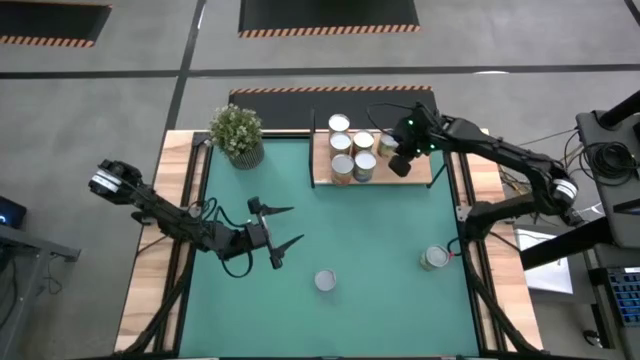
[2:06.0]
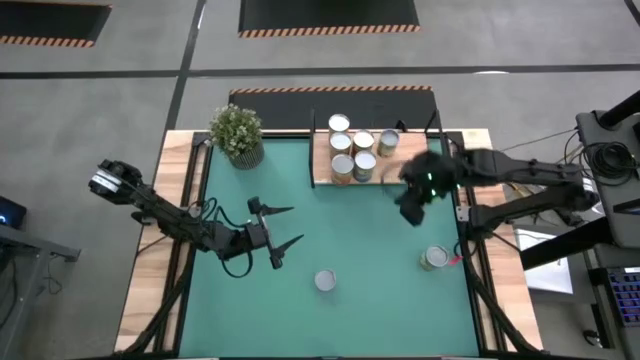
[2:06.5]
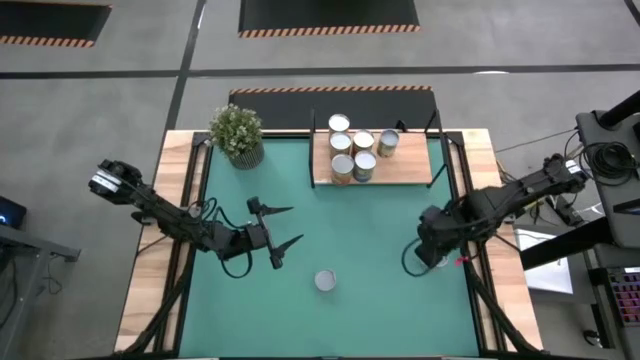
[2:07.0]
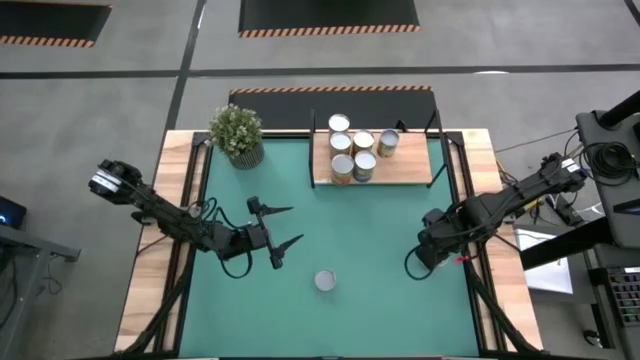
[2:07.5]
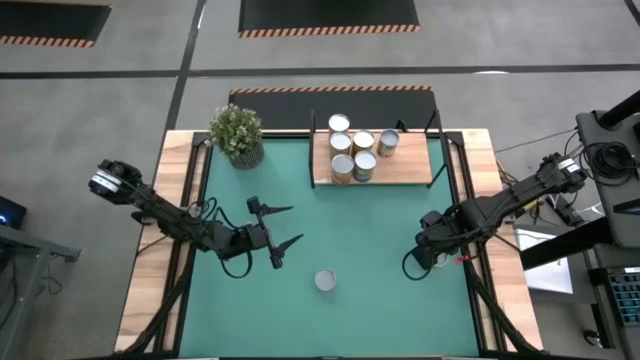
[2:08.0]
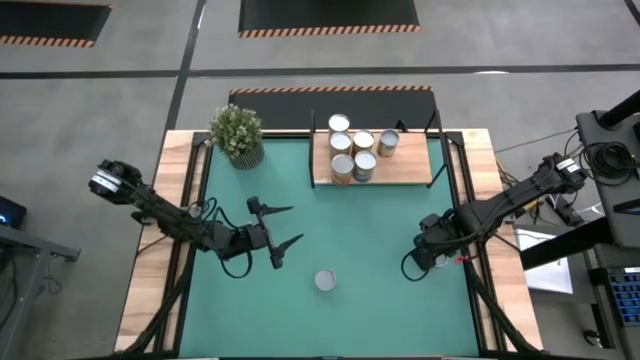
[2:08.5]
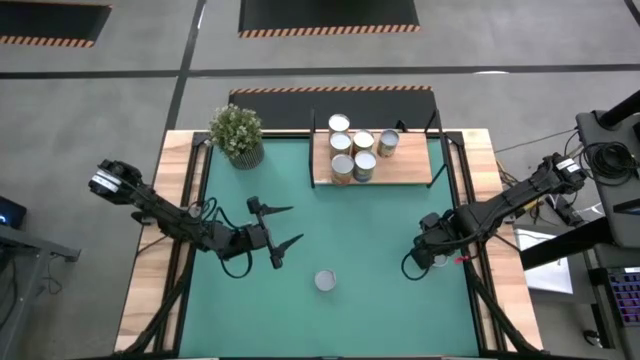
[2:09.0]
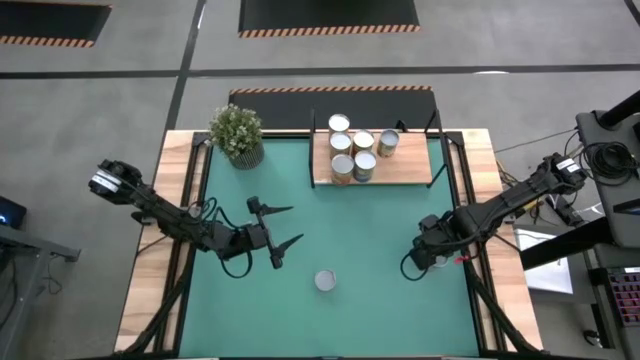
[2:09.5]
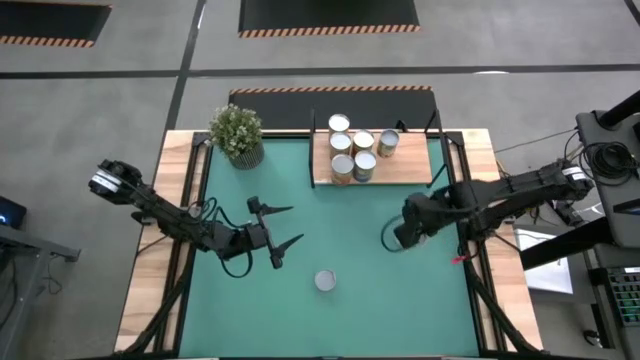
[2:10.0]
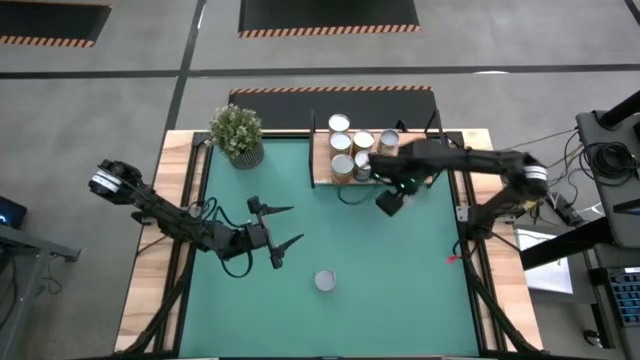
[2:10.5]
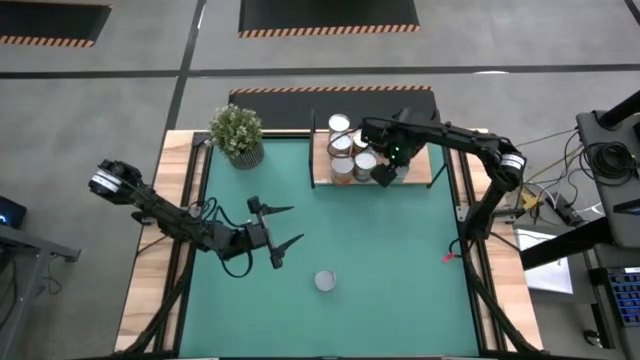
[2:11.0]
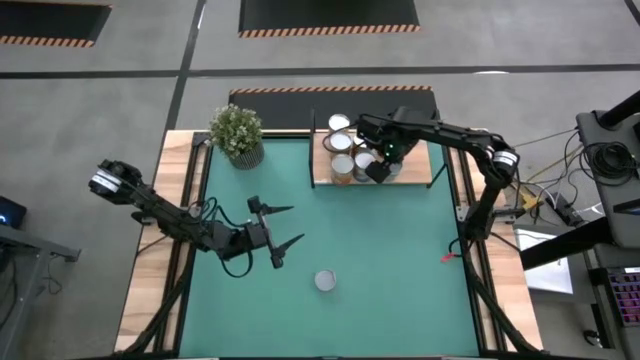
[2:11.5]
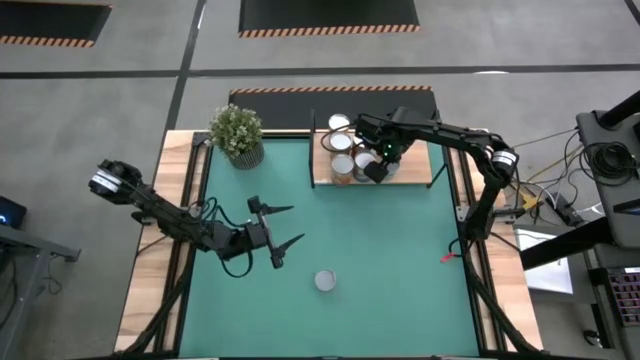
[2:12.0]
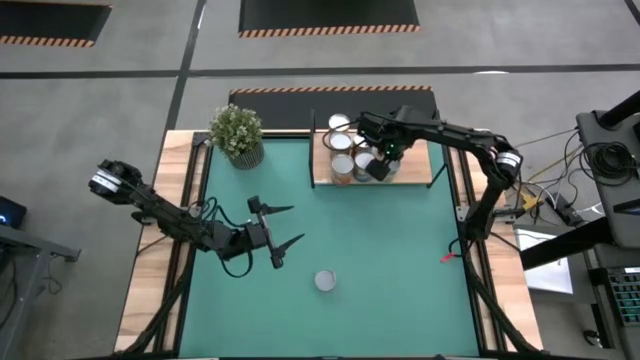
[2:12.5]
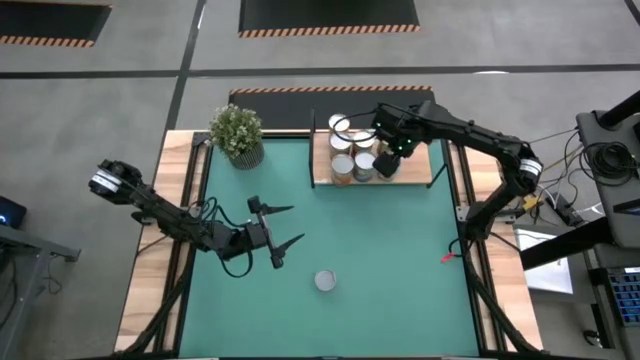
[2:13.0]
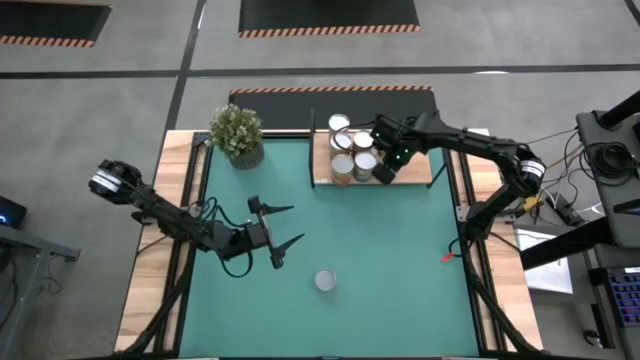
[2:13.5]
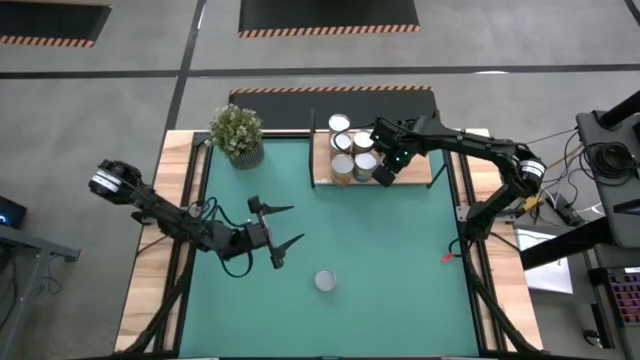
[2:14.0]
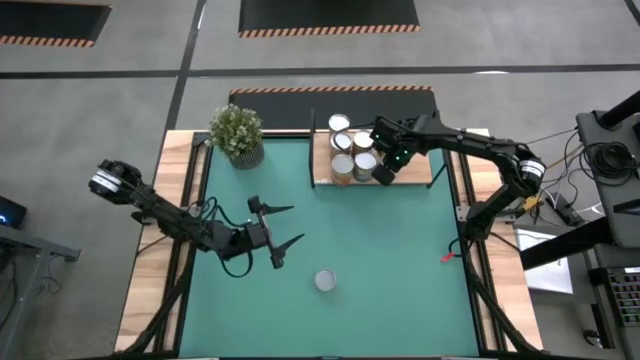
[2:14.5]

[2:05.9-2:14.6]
Task: Pick and place cans onto a shelf
Put the green can on the shelf

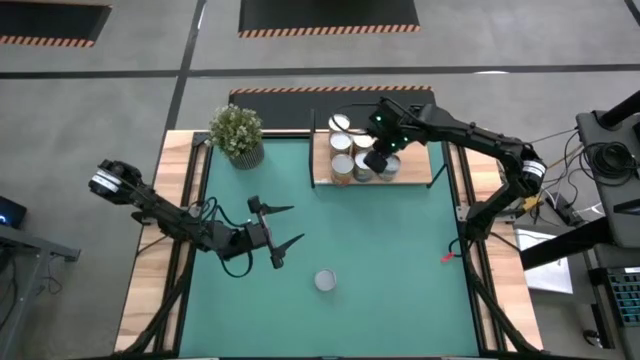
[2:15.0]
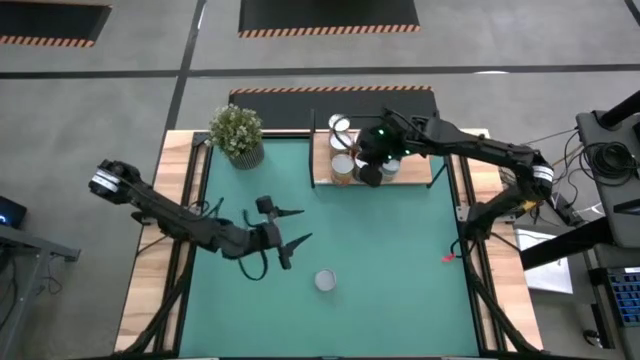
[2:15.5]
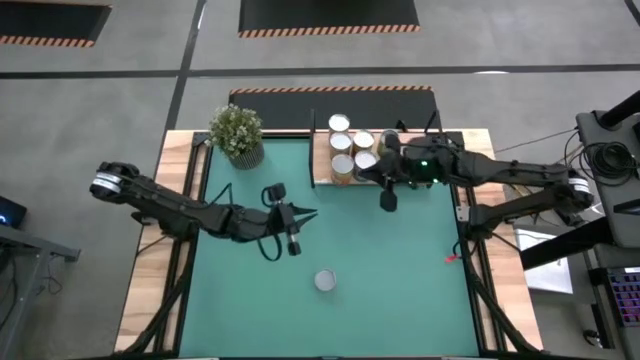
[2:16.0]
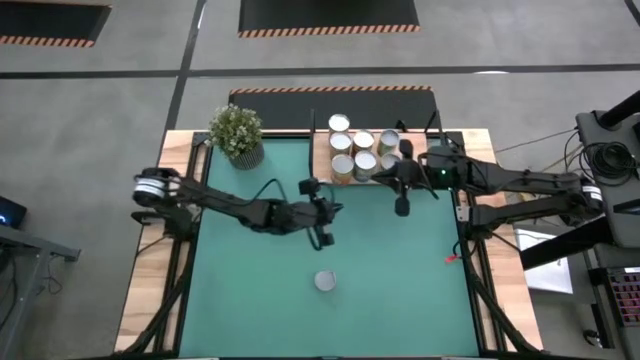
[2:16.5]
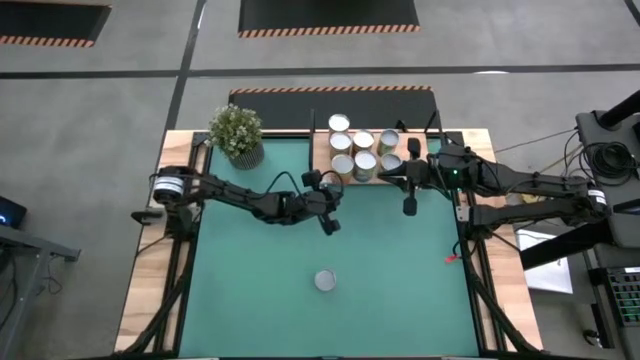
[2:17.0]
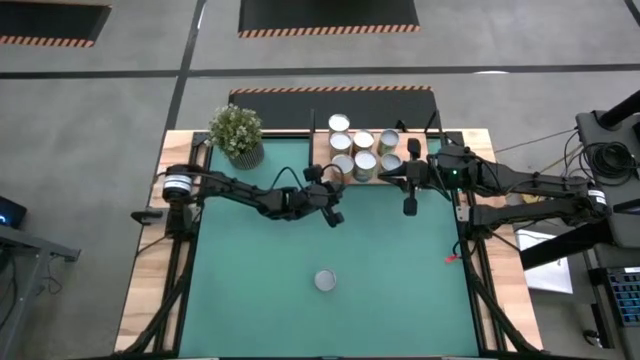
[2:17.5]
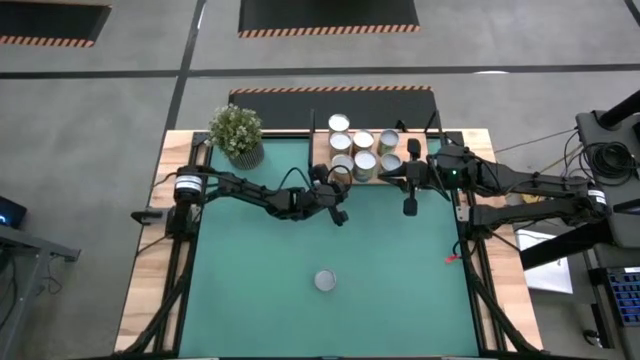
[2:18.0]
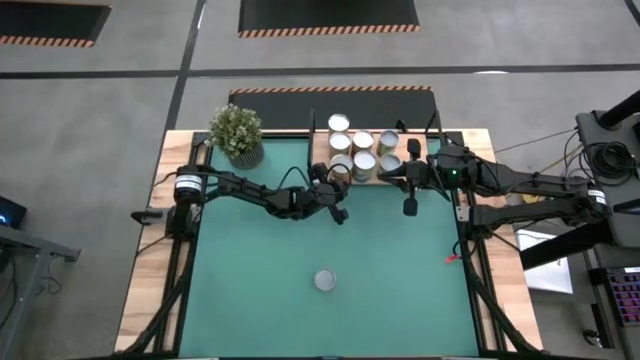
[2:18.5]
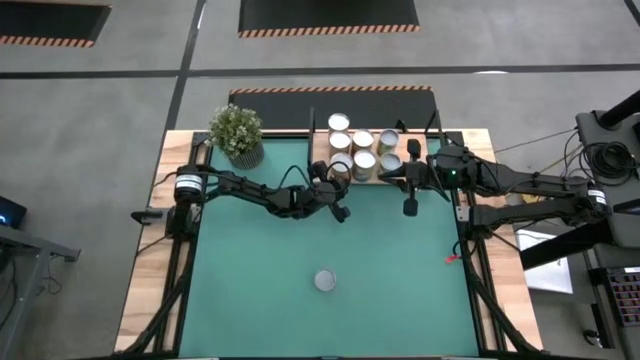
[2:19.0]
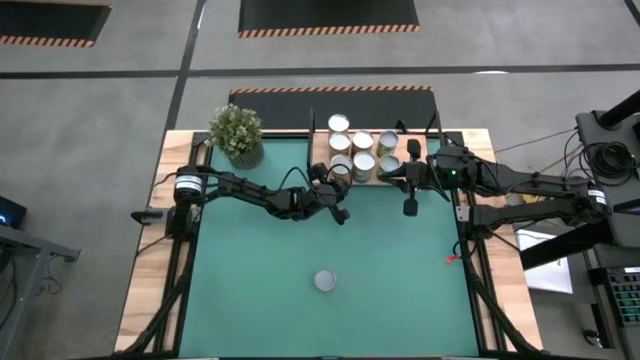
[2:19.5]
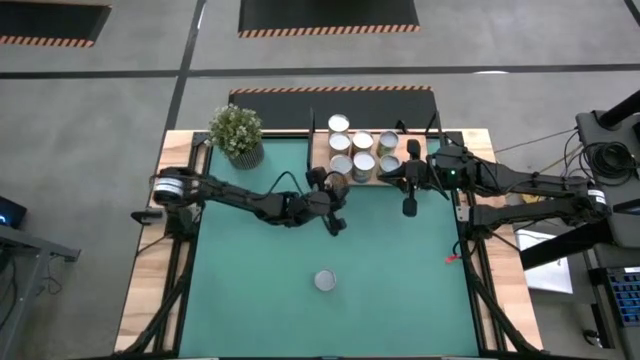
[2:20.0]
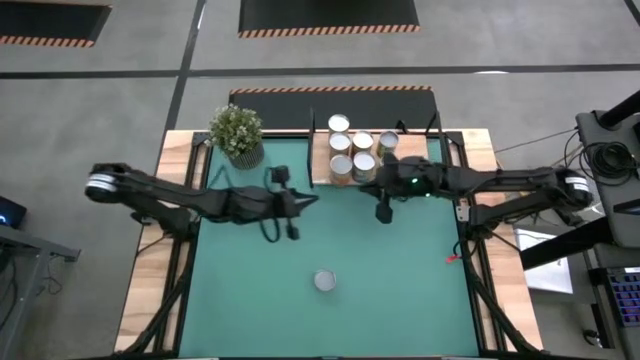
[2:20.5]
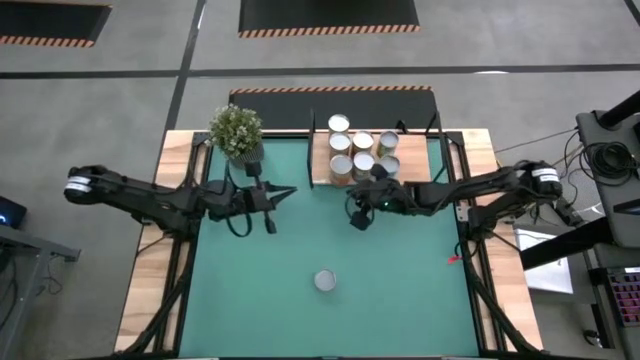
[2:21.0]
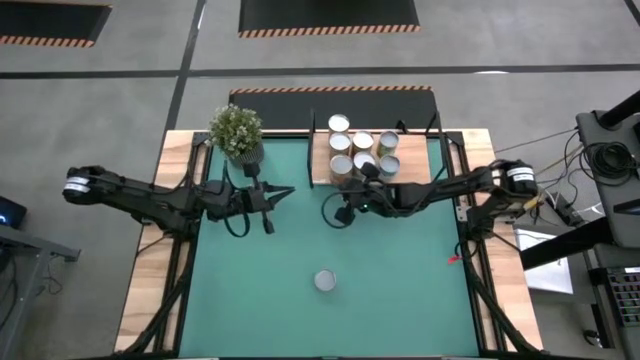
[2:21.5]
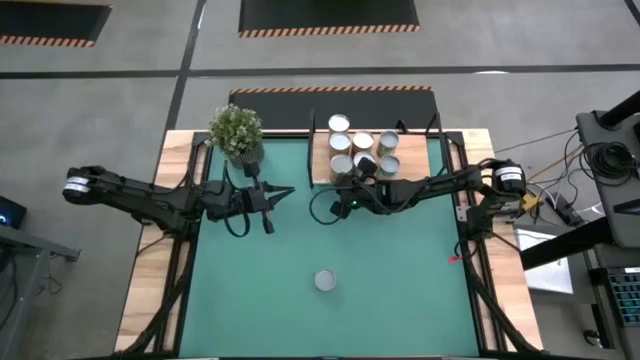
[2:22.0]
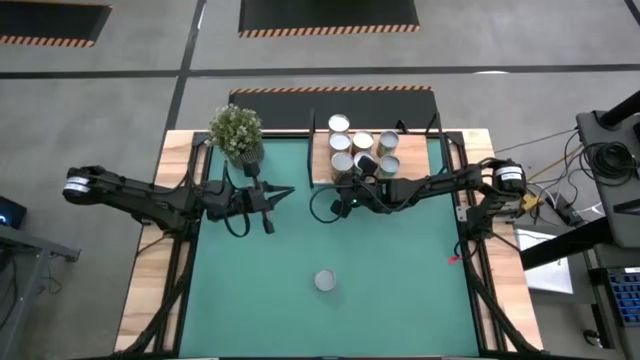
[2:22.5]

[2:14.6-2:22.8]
Adjust the orange can

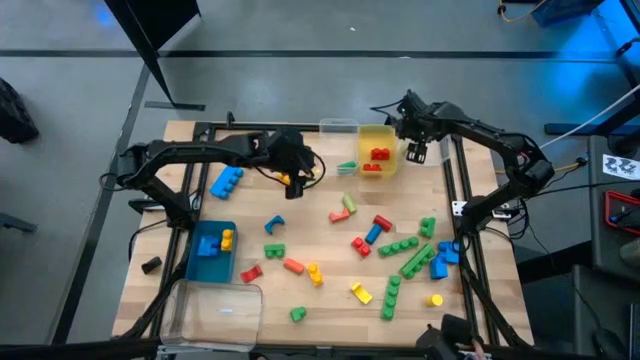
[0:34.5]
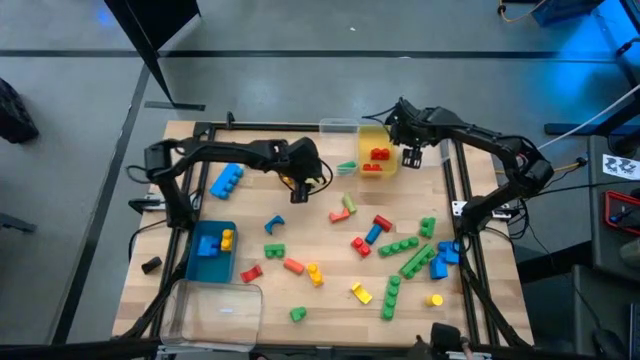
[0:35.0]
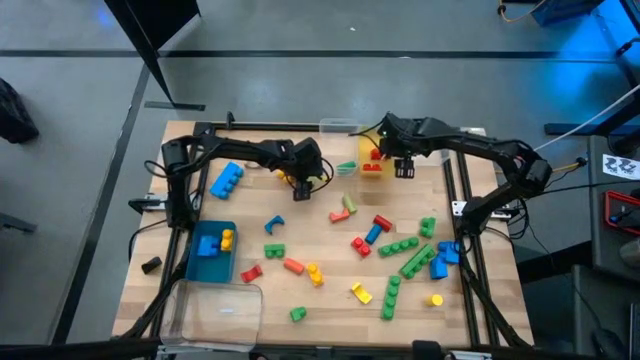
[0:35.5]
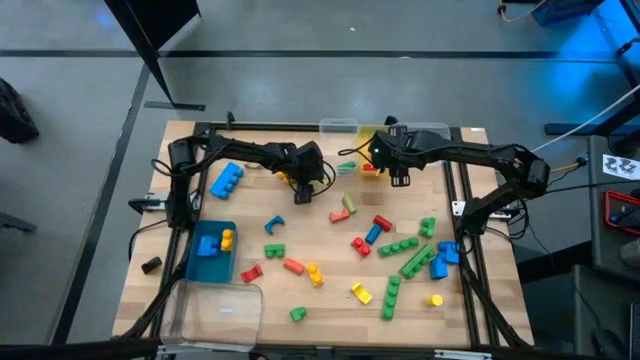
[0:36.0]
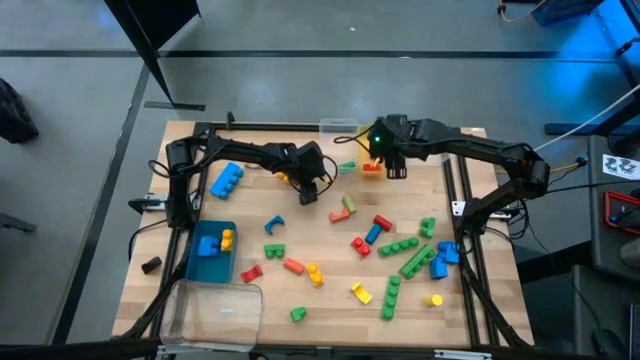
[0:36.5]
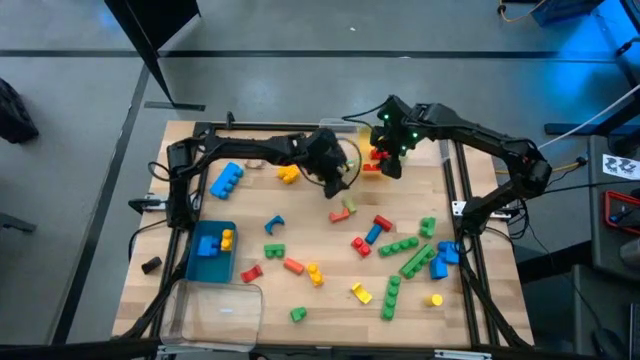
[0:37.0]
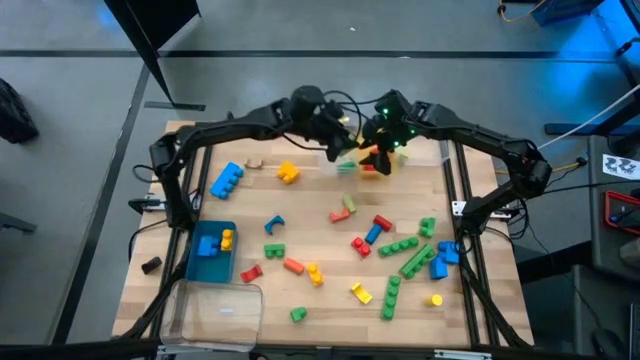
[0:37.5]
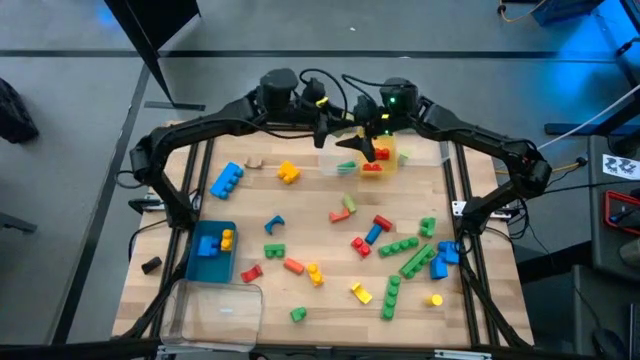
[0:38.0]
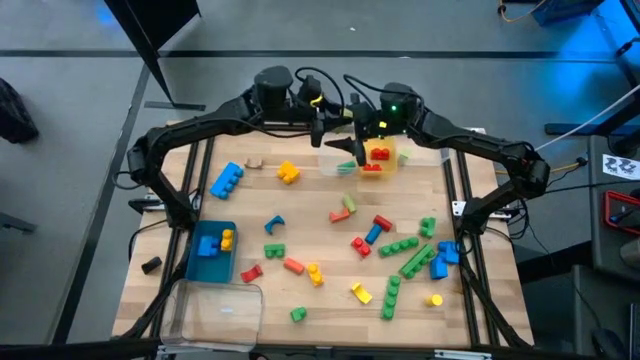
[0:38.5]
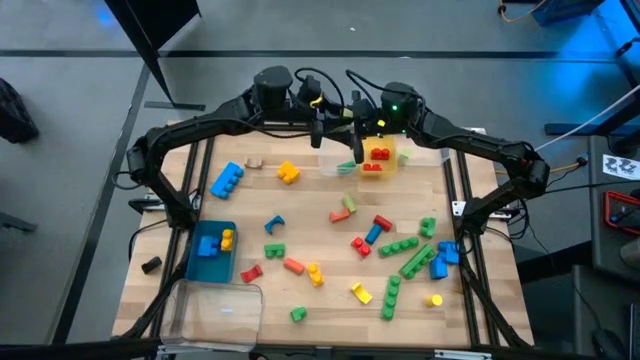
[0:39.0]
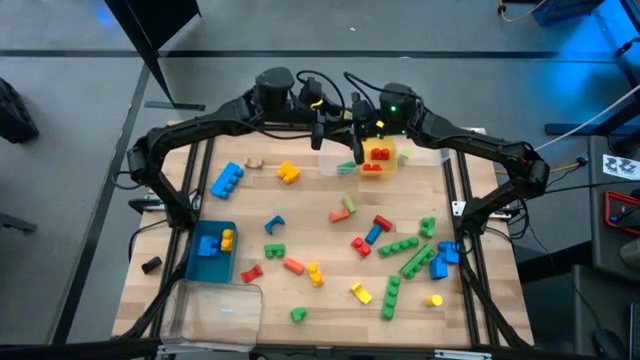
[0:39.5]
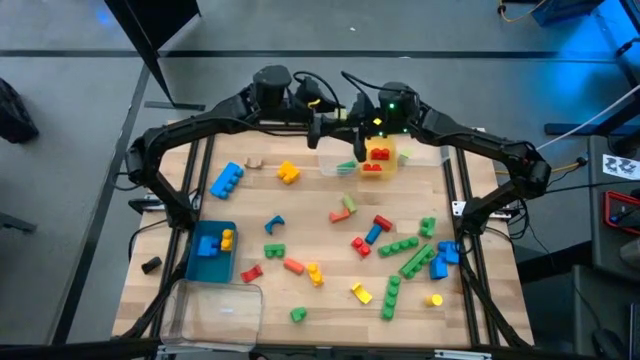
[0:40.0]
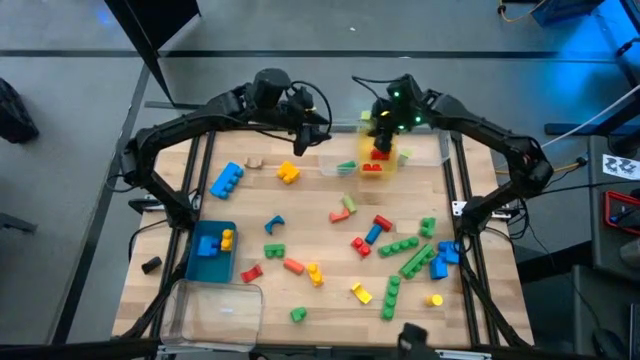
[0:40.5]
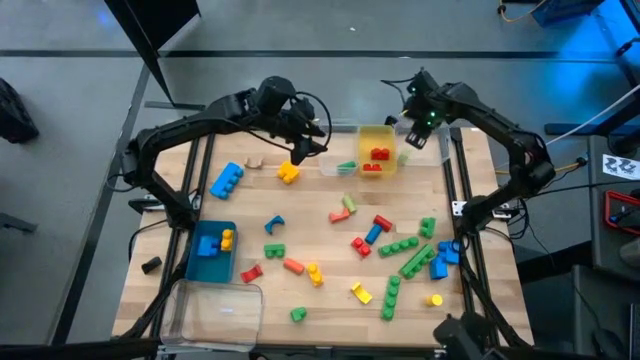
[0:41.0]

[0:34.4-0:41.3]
Task: Sort blocks by size
Put the light green arch block into the top right transparent bin
